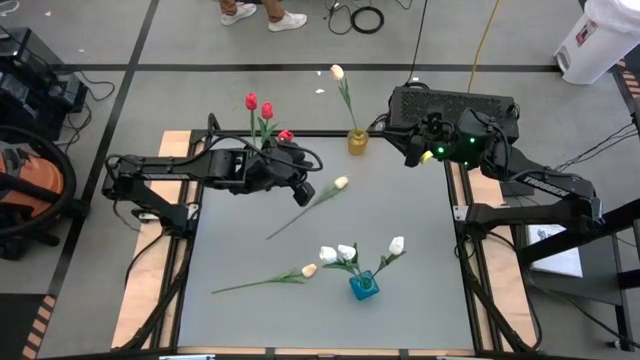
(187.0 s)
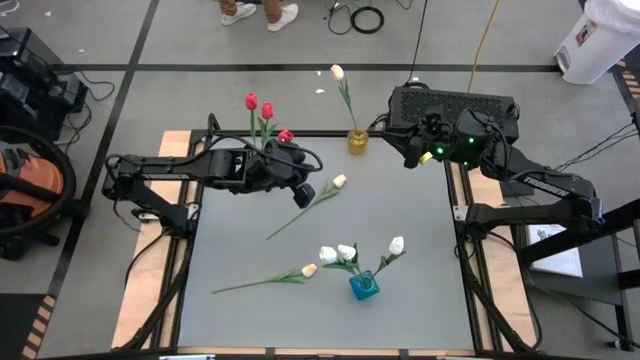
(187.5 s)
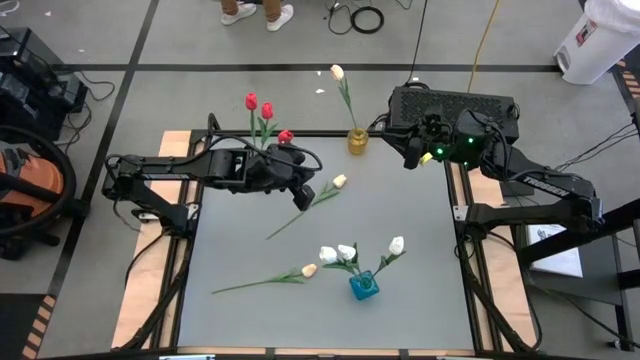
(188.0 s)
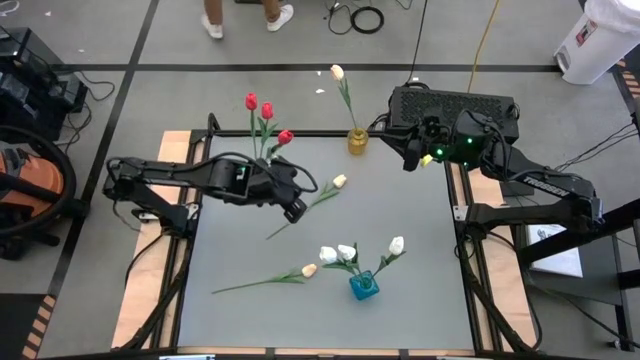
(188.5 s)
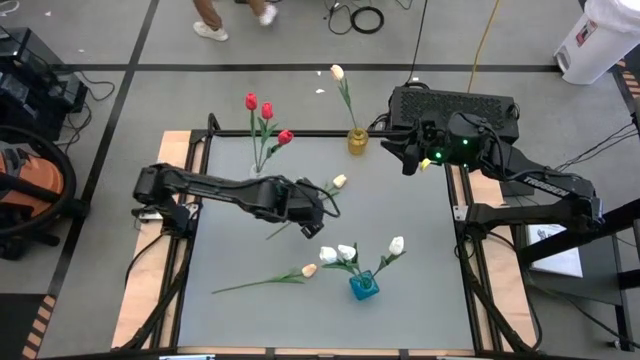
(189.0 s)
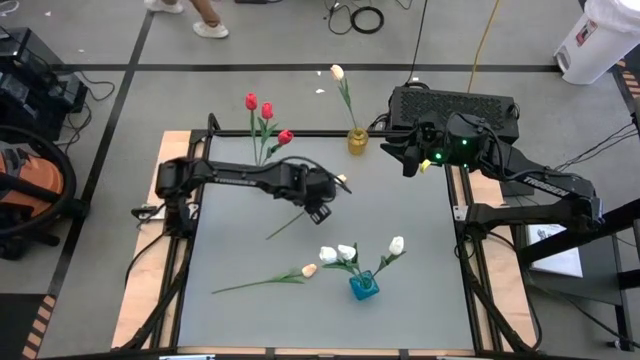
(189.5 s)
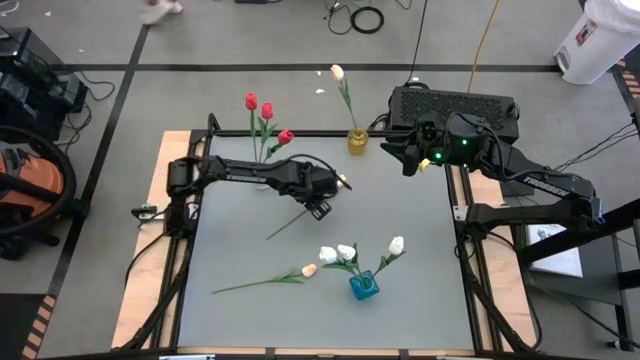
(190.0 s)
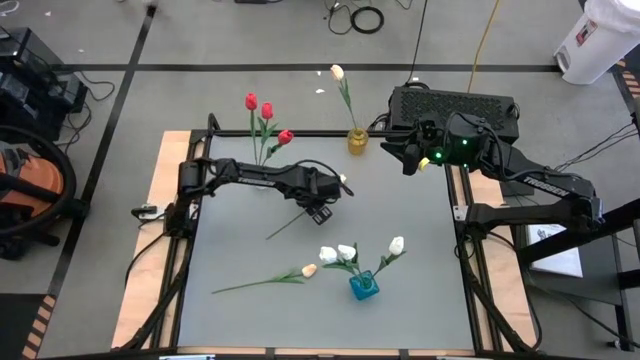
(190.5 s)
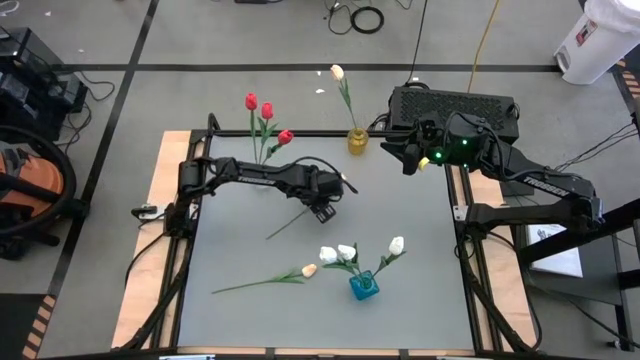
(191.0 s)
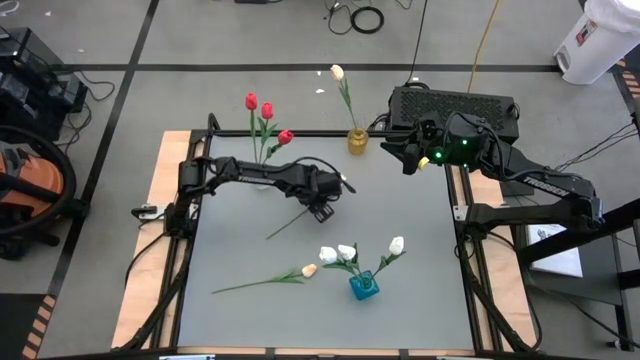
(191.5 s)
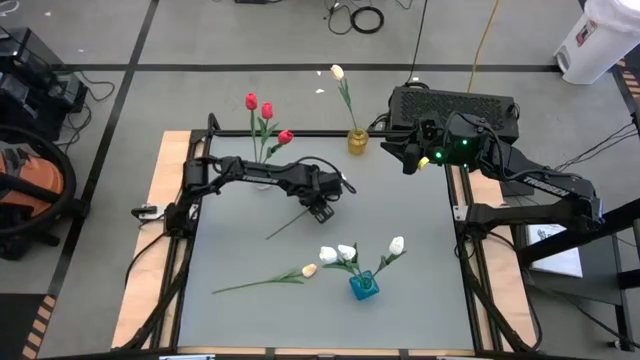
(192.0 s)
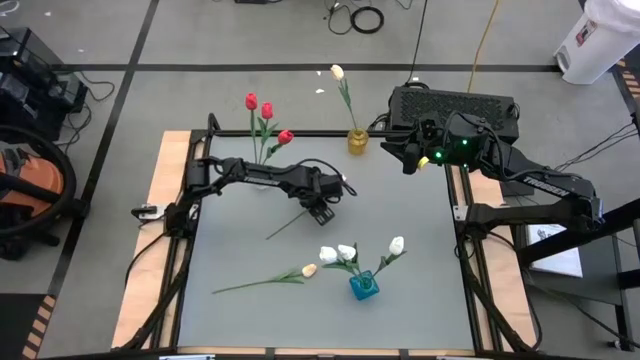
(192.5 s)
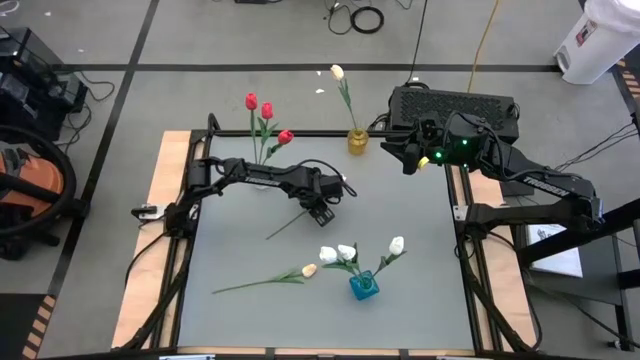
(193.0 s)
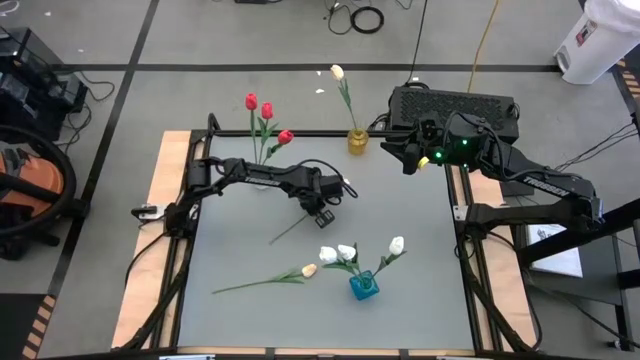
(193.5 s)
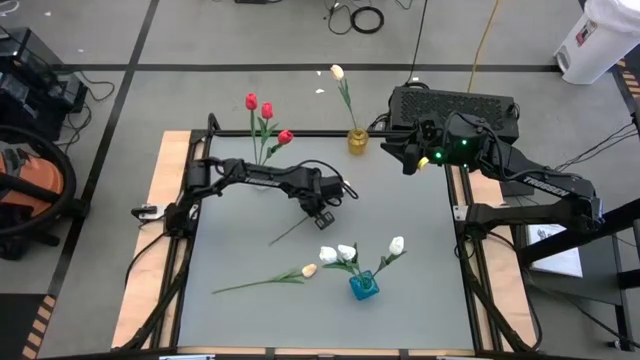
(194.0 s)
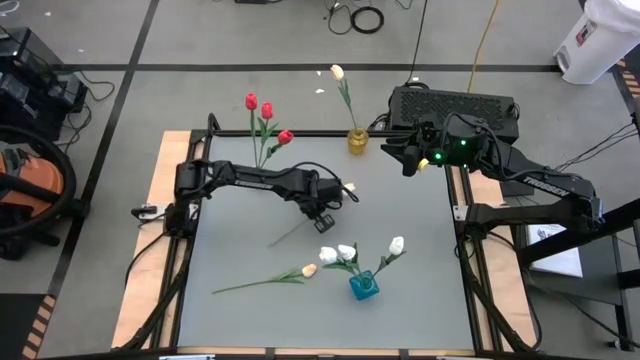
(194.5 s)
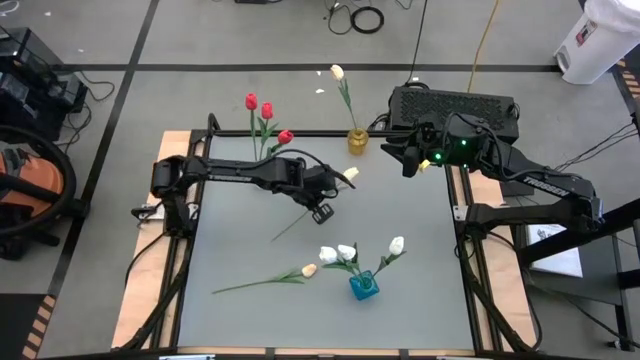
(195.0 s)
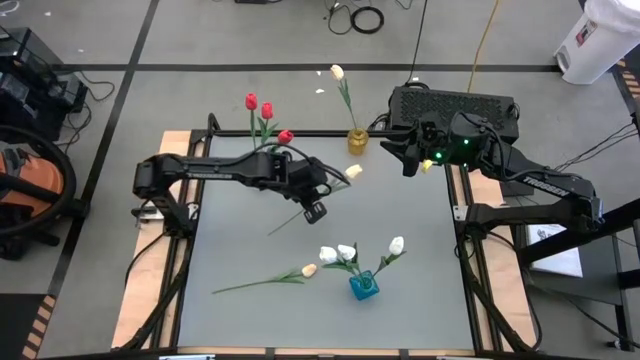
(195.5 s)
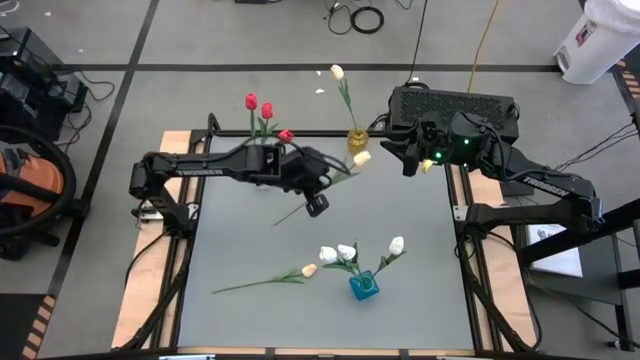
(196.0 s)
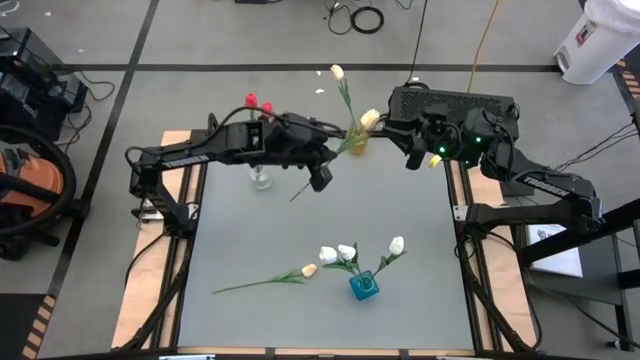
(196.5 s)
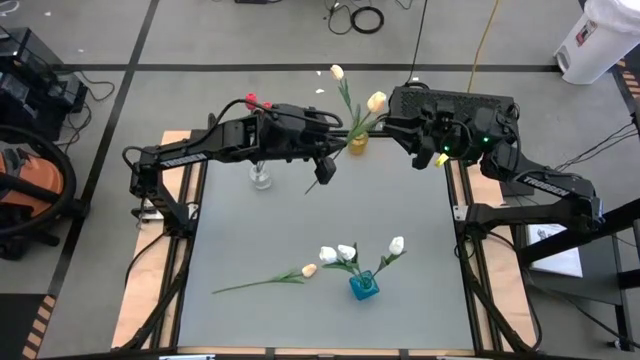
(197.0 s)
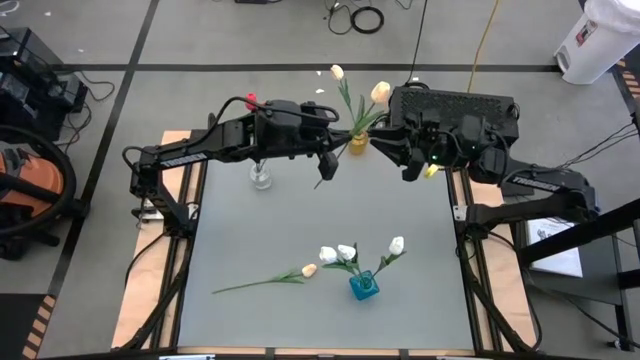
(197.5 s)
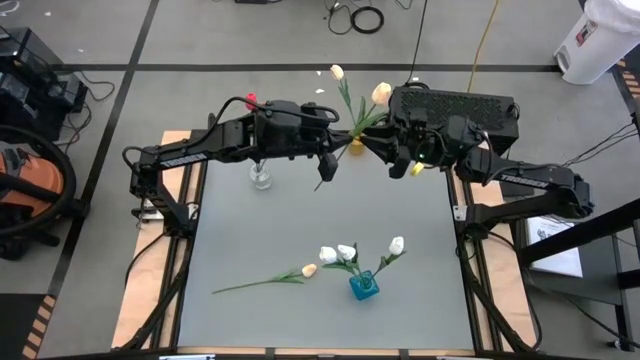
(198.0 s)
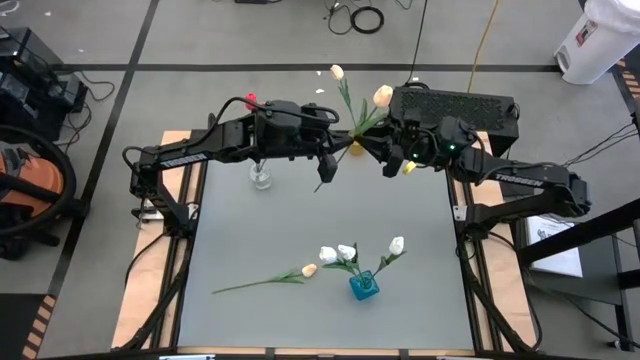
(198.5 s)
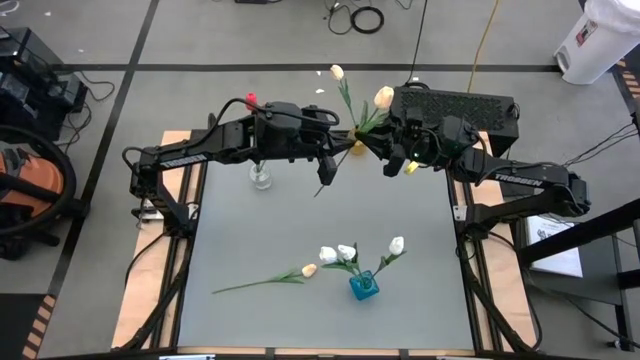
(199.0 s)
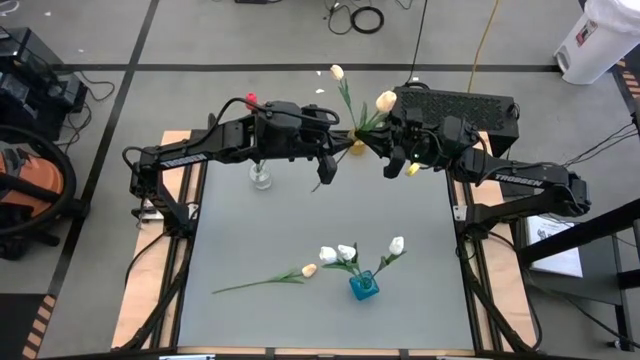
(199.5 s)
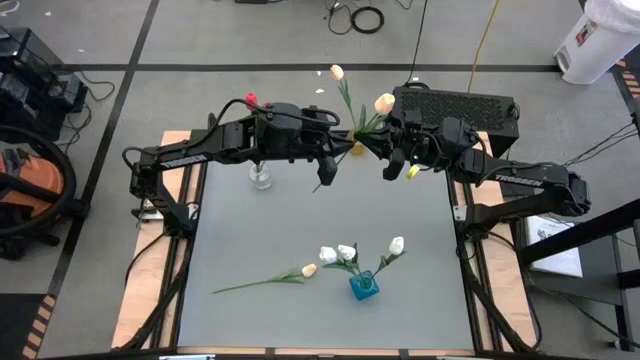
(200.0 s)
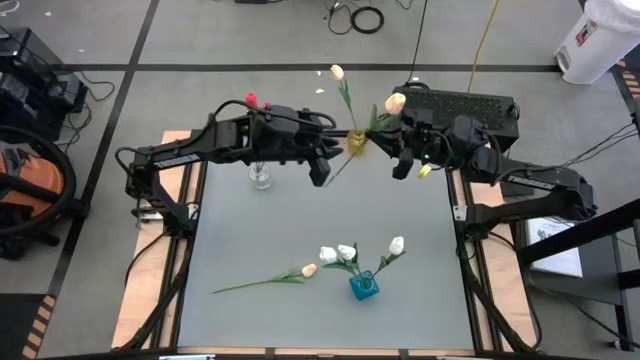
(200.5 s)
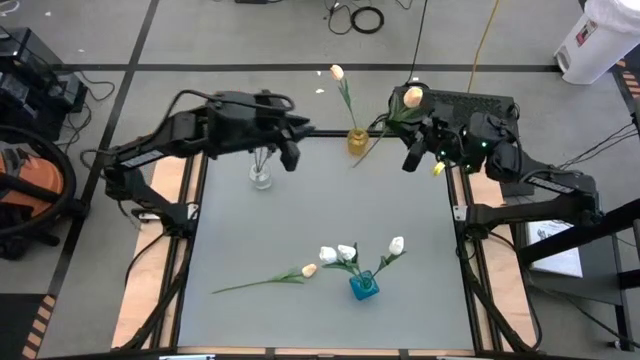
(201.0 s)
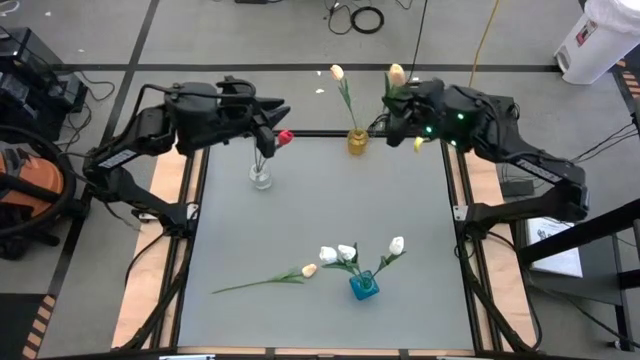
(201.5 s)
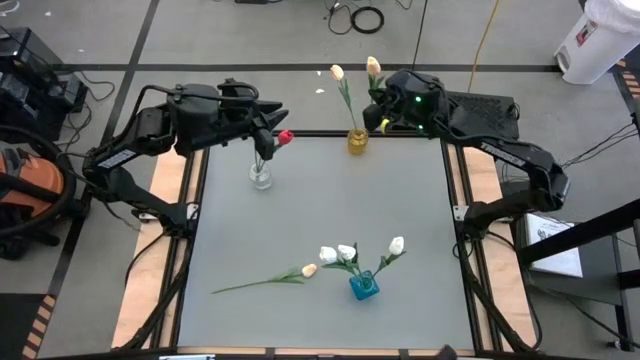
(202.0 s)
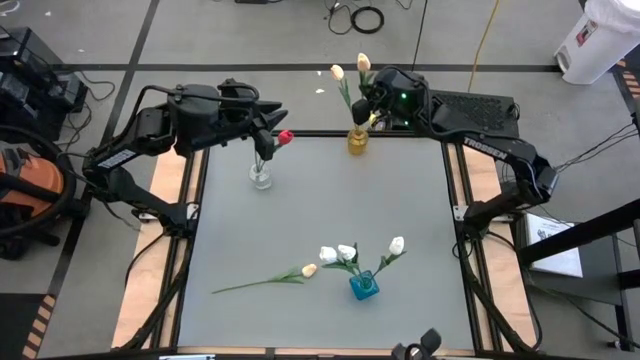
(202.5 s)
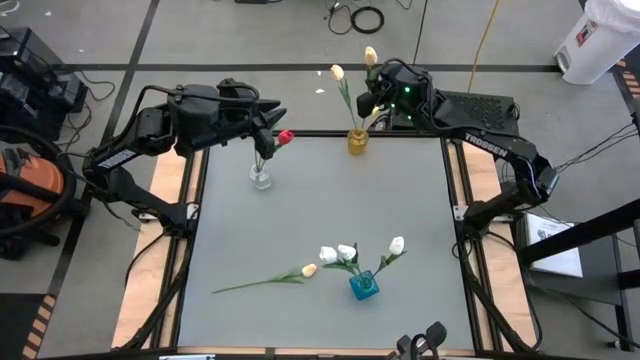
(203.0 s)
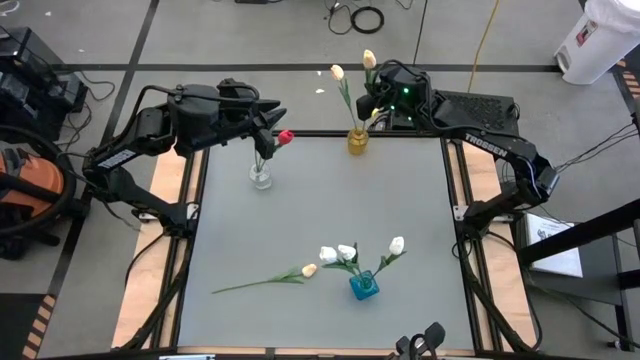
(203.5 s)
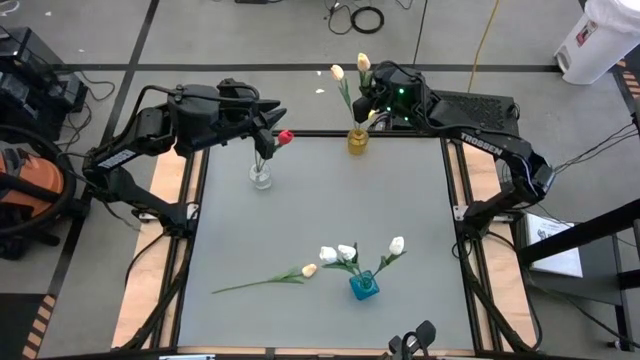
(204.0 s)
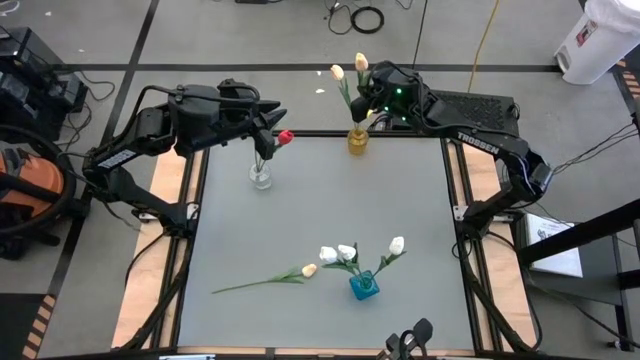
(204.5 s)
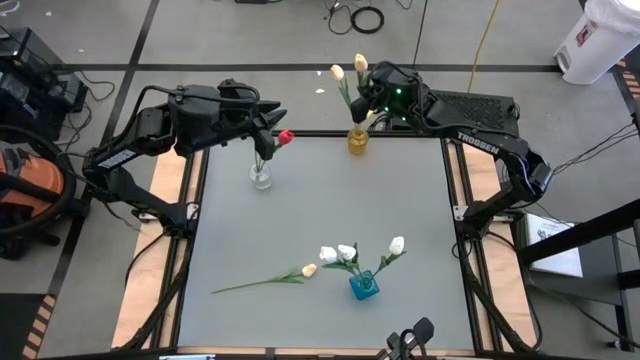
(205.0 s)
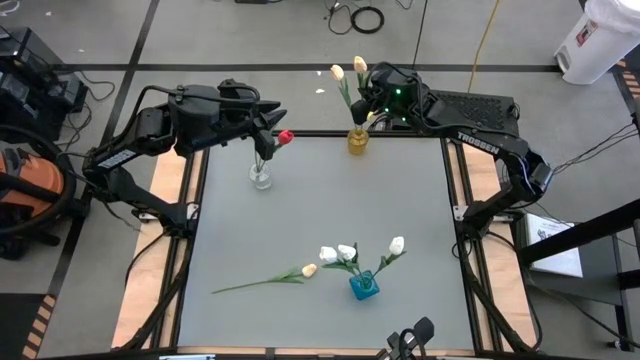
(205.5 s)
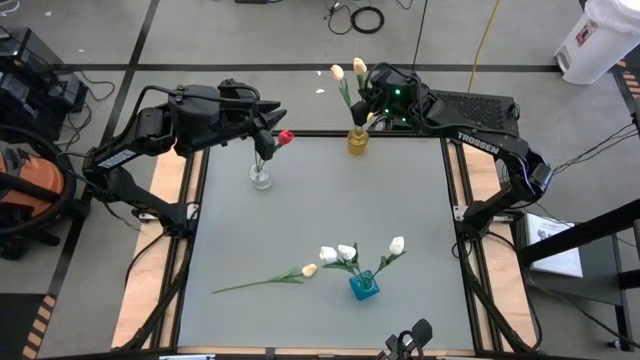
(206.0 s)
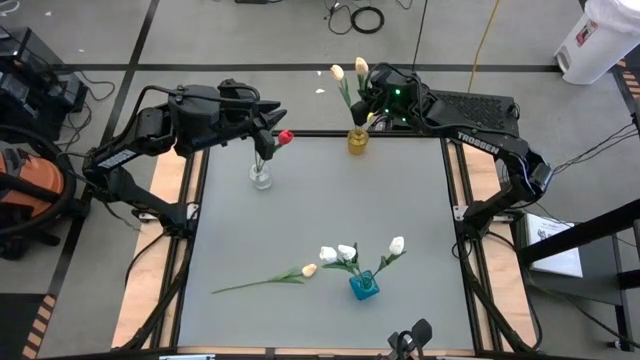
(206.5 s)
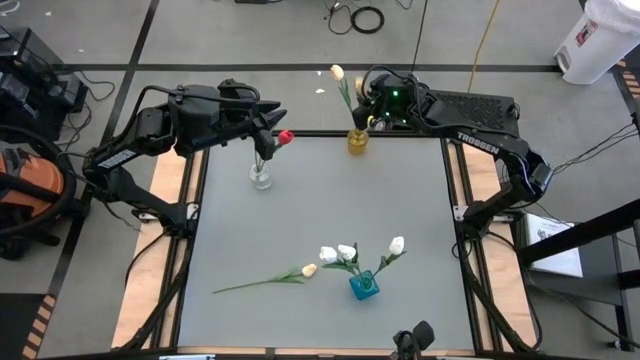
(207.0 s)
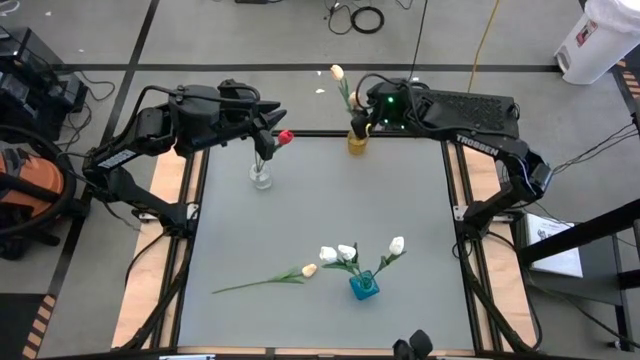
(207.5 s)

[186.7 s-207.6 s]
Task: Sort flowers into vase by color
Put the top light yellow tulip into the yellow vase
